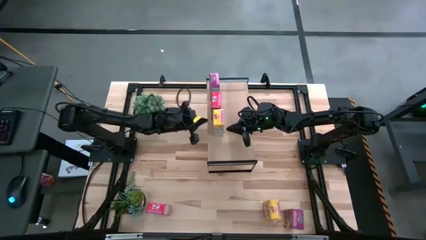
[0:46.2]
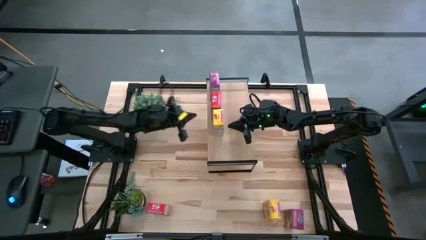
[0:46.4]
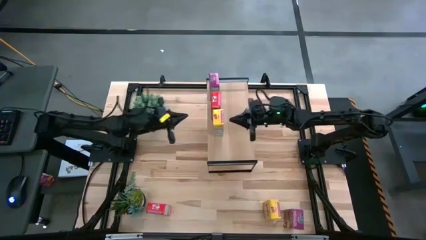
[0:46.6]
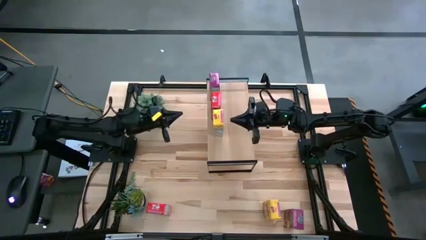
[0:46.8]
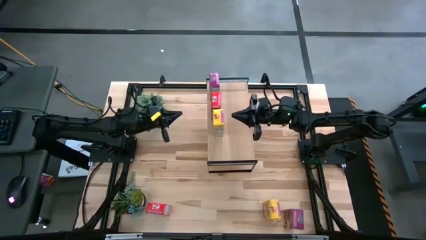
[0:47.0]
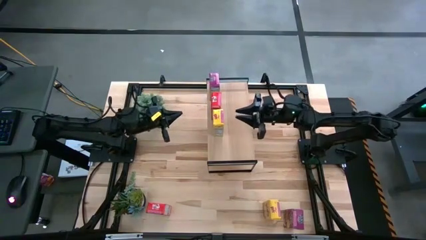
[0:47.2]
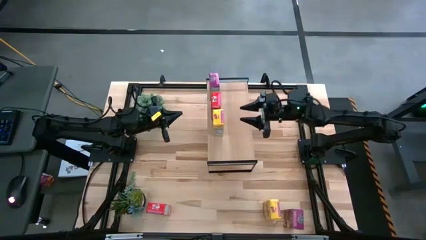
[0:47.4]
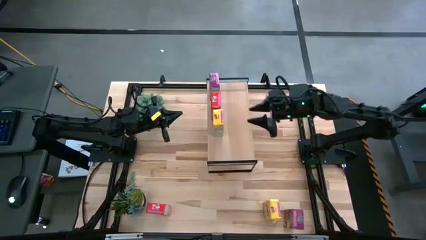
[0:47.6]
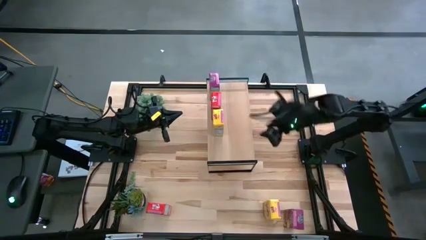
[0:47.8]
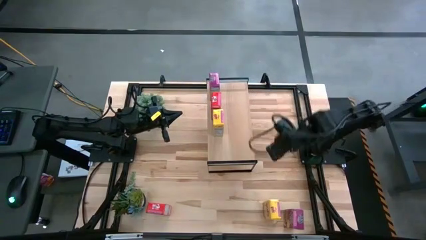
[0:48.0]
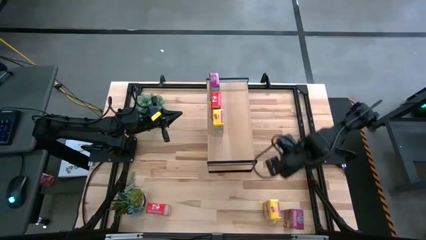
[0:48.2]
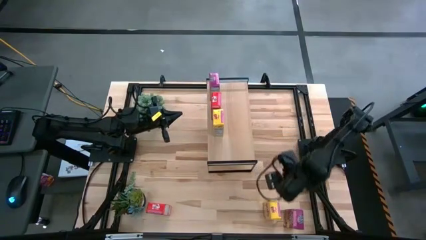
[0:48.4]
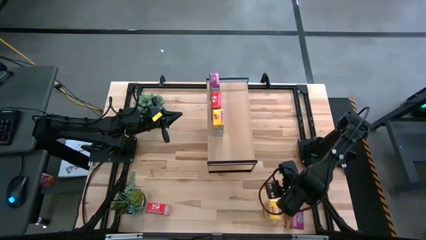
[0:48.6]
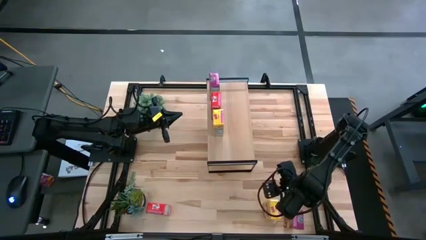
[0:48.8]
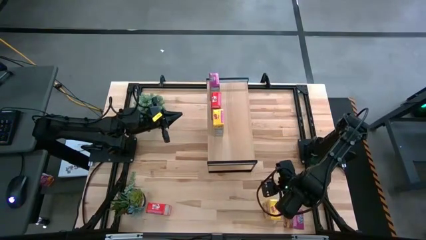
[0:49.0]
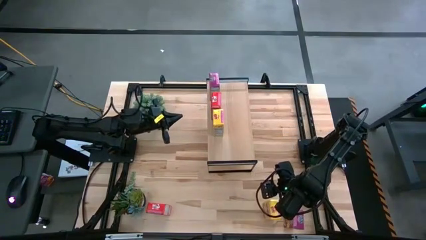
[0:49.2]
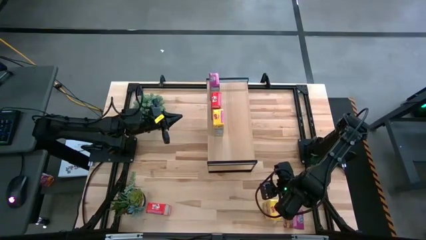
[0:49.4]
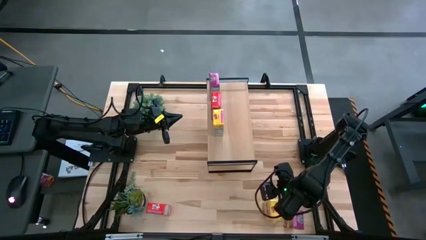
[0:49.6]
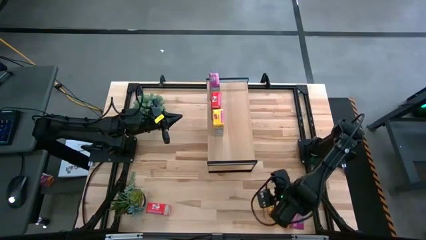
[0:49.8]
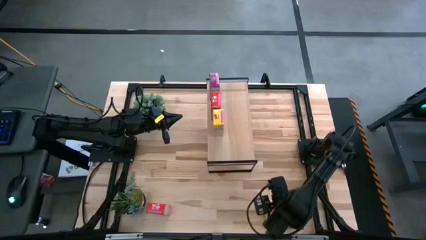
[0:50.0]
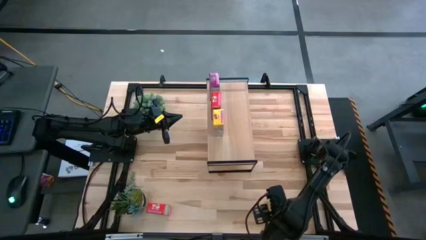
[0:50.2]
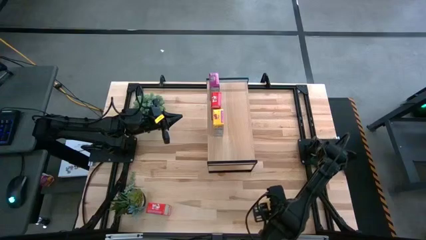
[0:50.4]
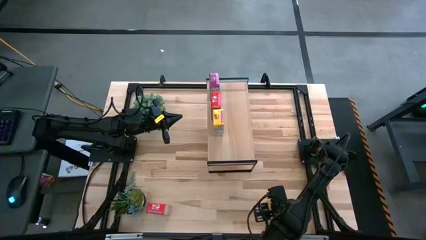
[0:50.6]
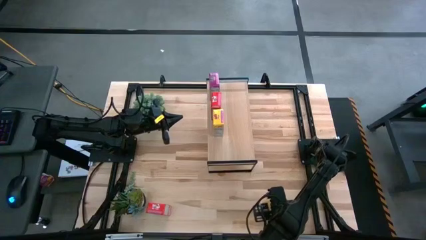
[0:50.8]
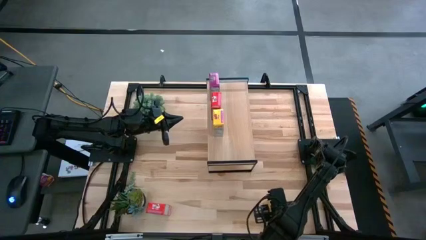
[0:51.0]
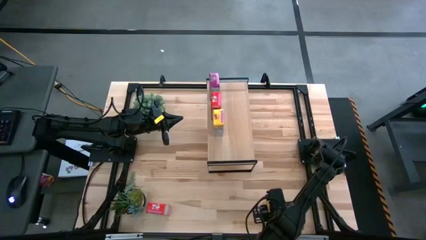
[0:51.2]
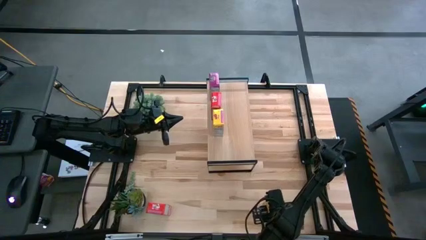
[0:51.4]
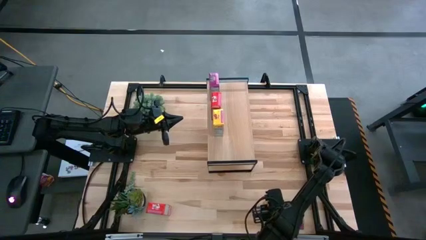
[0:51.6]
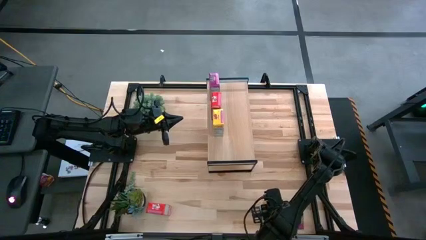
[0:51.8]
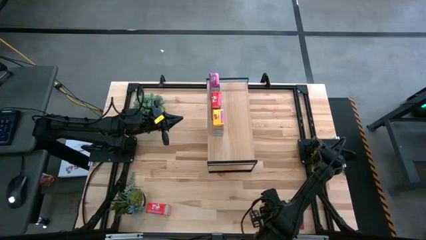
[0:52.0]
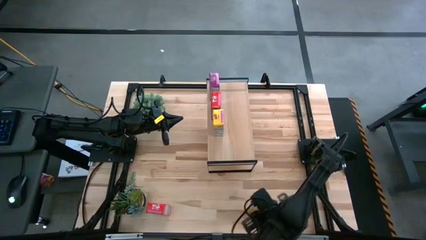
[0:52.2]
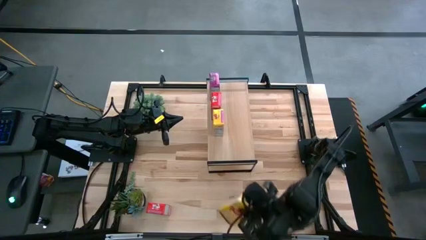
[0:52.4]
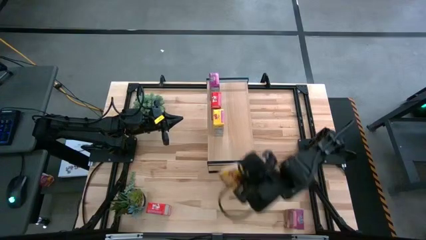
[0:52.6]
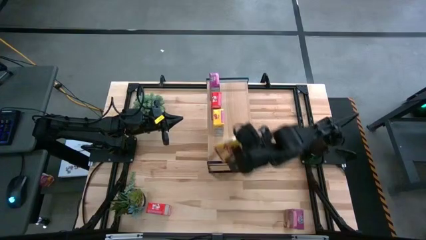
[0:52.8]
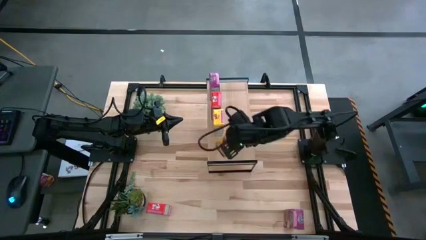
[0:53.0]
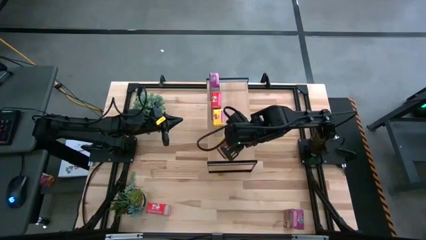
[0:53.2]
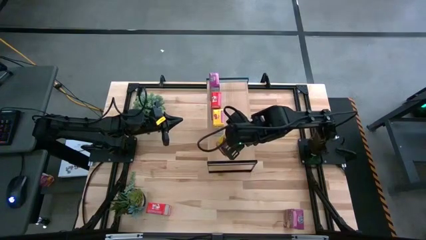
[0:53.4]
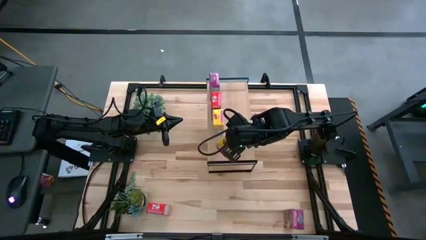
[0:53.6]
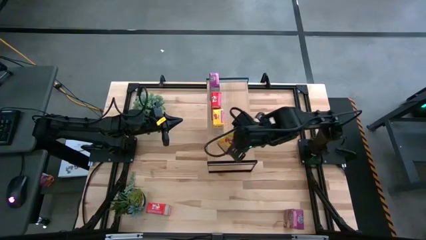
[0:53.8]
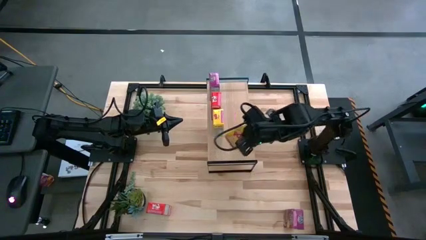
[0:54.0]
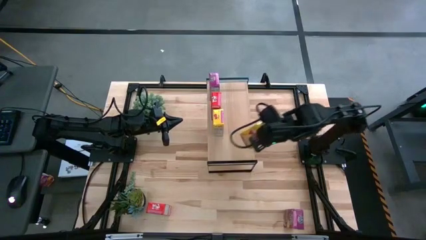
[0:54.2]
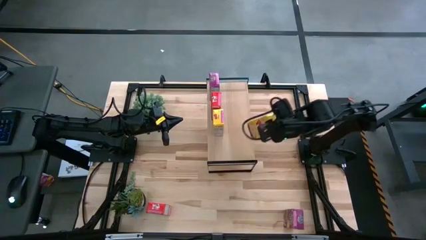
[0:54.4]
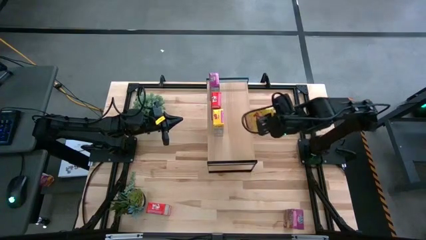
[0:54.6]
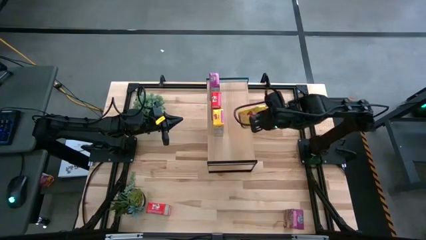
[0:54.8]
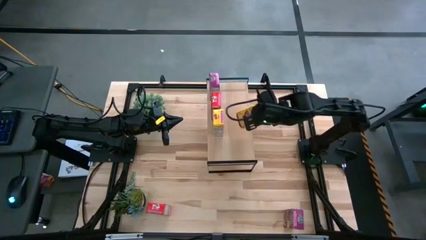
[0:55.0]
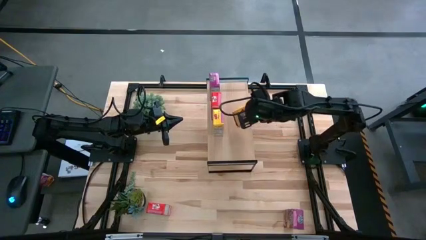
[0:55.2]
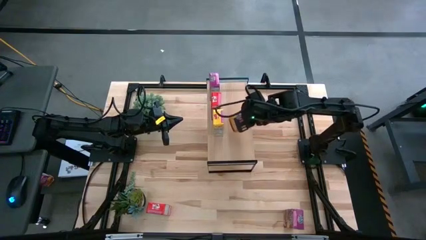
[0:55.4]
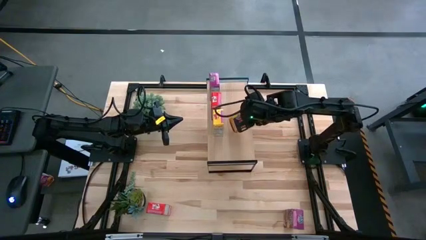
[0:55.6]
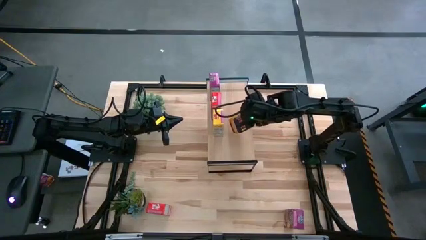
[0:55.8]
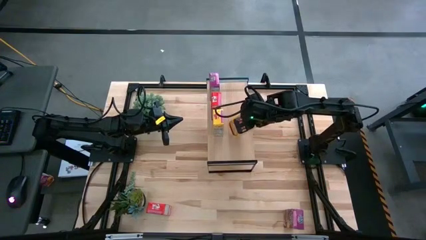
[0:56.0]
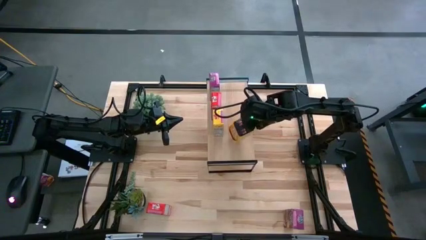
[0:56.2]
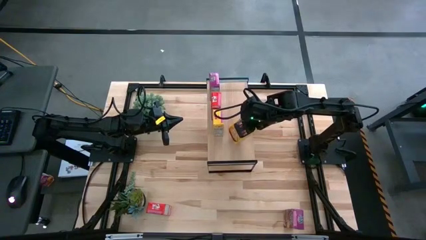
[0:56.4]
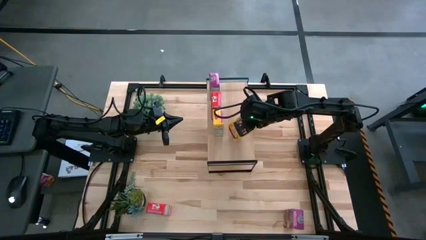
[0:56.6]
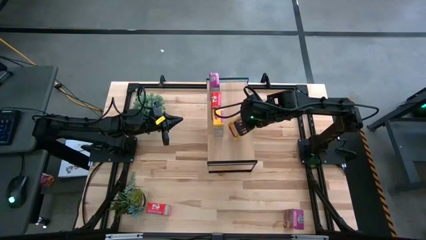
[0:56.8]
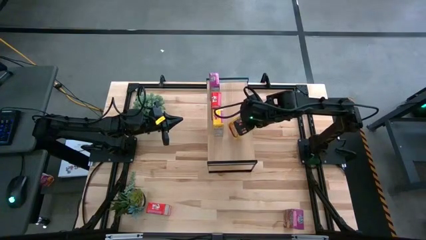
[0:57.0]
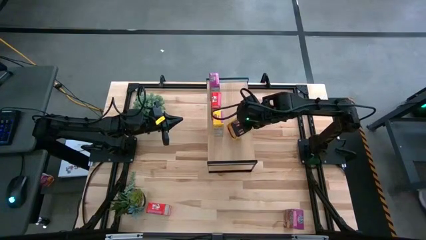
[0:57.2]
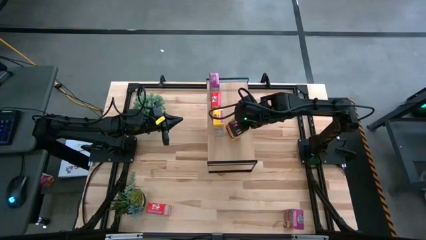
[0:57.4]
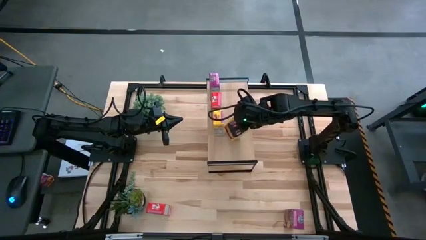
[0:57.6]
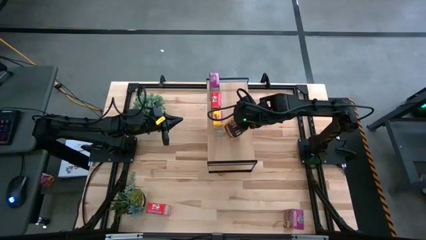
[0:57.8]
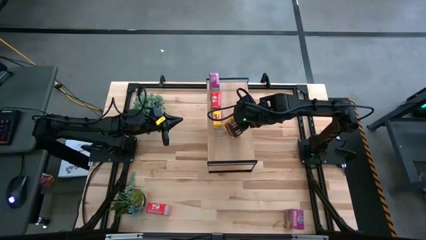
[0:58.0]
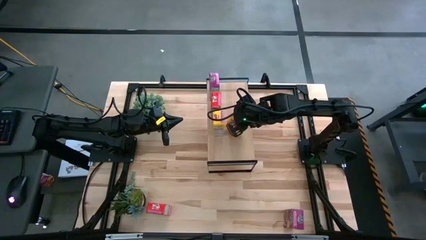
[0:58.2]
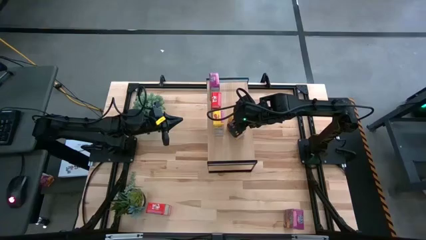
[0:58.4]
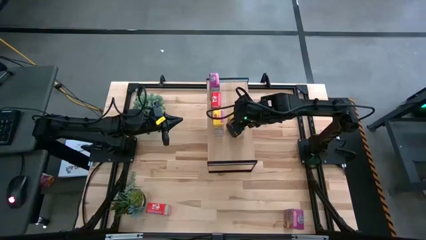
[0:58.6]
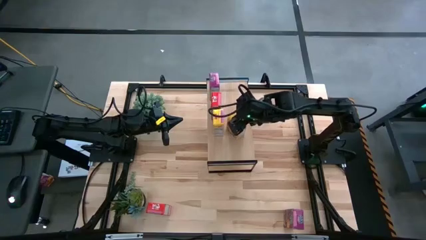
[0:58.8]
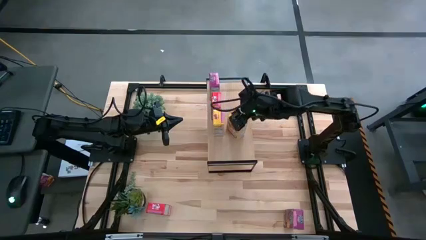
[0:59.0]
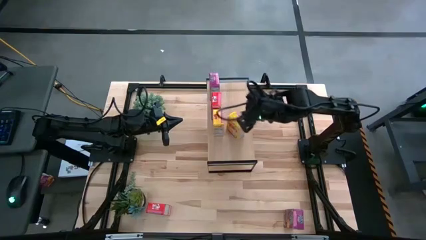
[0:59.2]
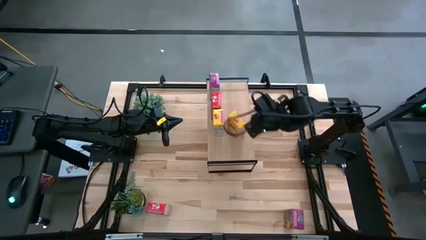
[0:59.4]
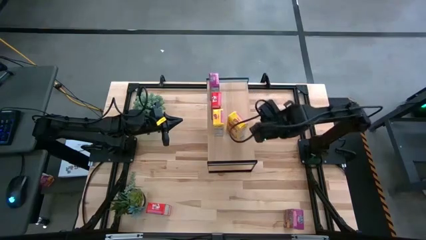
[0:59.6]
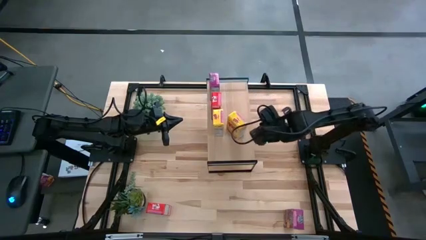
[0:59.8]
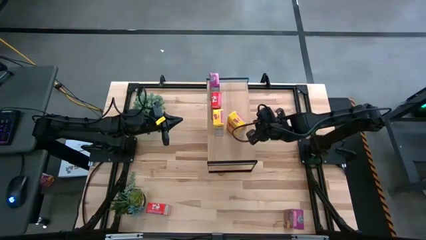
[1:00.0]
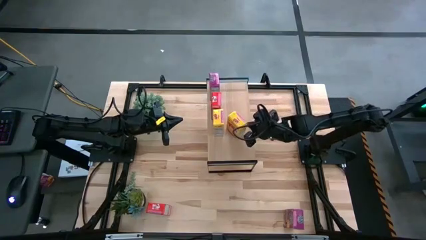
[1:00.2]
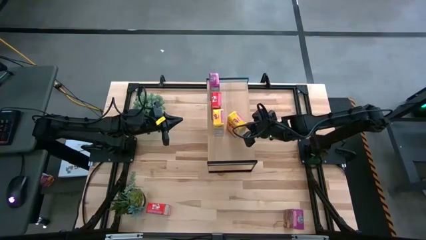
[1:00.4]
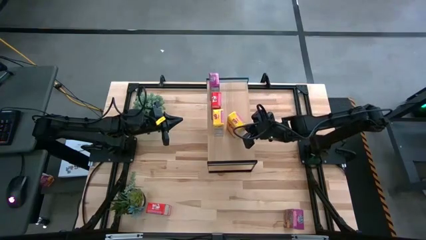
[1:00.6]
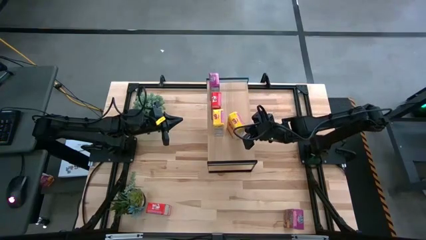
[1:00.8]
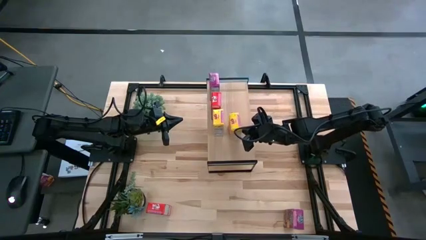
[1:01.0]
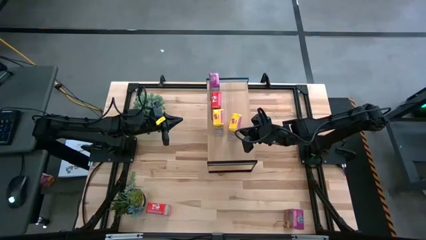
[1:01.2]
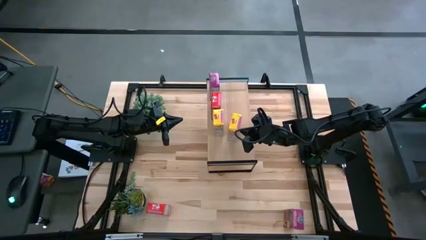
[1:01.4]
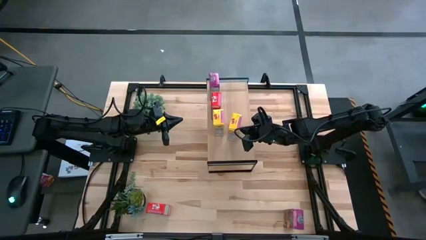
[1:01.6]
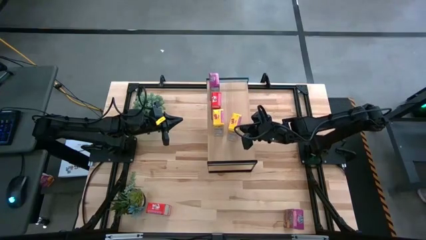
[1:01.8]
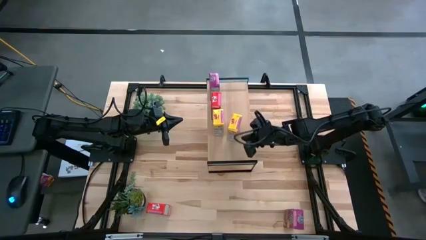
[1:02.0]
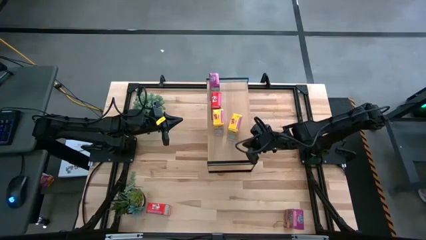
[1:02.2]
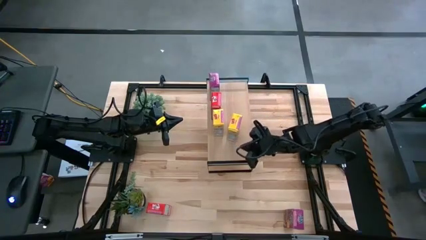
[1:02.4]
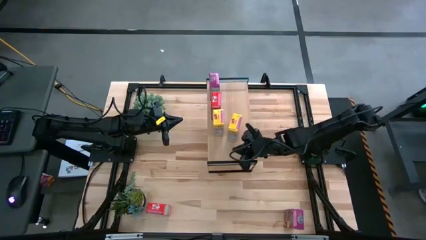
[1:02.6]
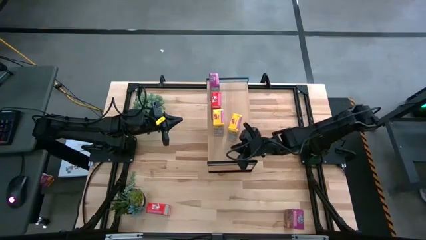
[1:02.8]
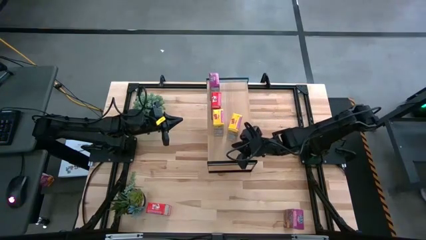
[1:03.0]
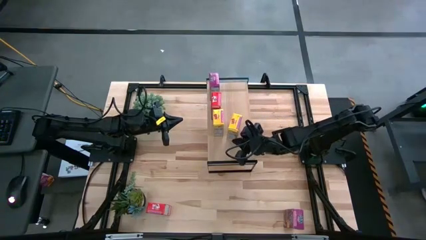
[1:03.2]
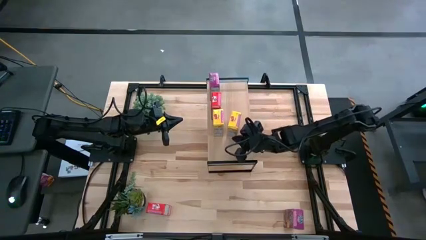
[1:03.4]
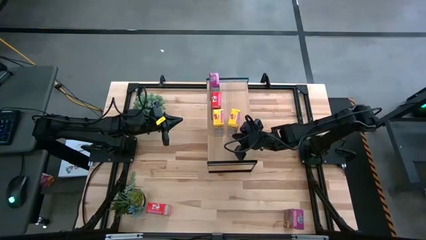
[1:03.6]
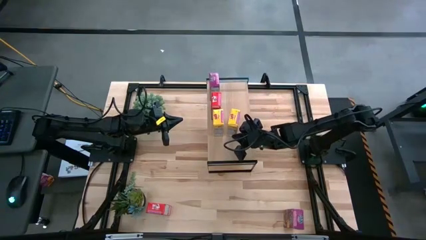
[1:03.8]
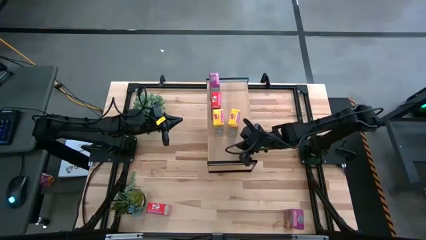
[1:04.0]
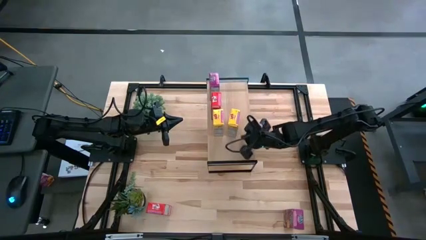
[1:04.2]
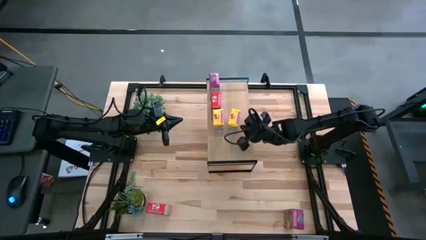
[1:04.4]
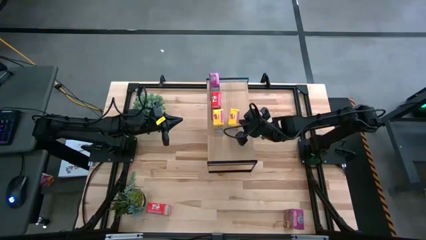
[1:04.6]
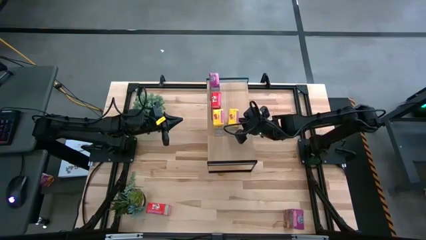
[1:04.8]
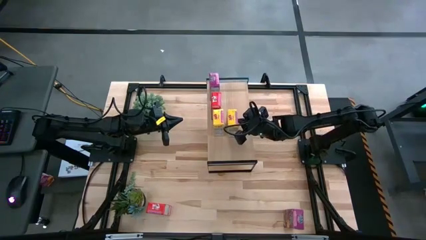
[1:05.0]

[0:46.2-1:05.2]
Task: Stack cereal on shelf
Put the yellow cereal box aligned with the other yellow cereal box on the shelf
